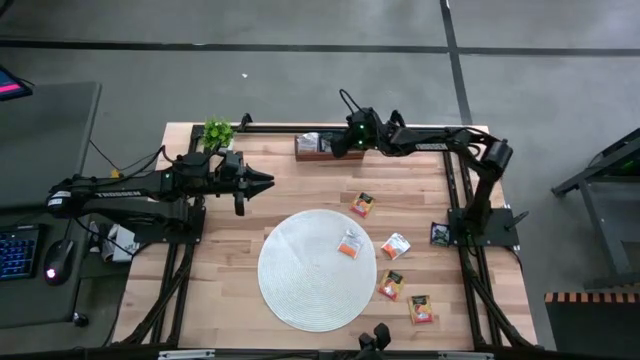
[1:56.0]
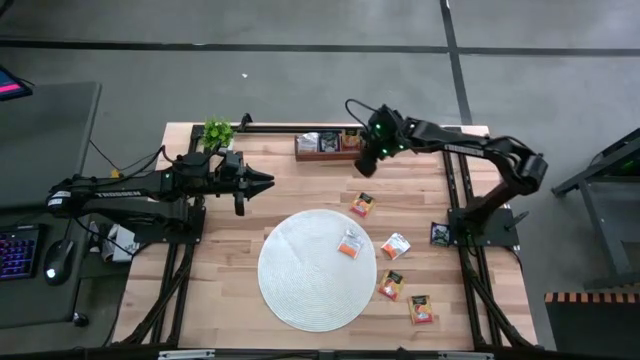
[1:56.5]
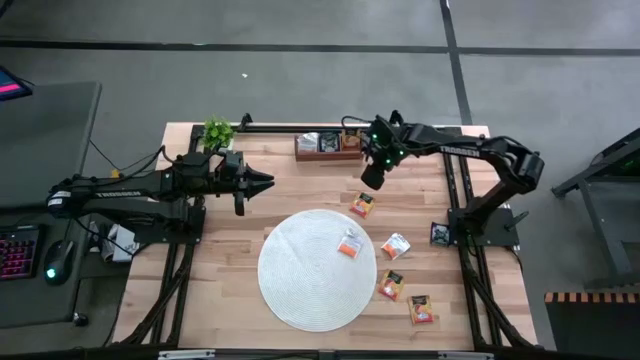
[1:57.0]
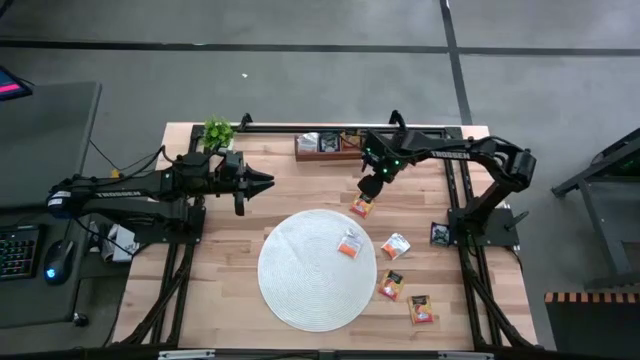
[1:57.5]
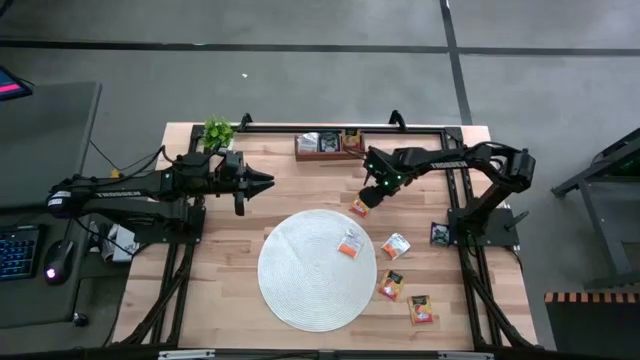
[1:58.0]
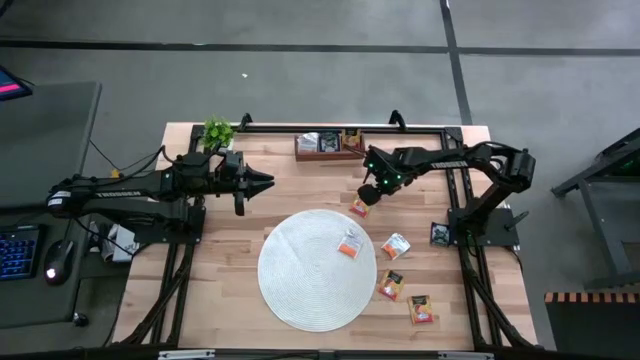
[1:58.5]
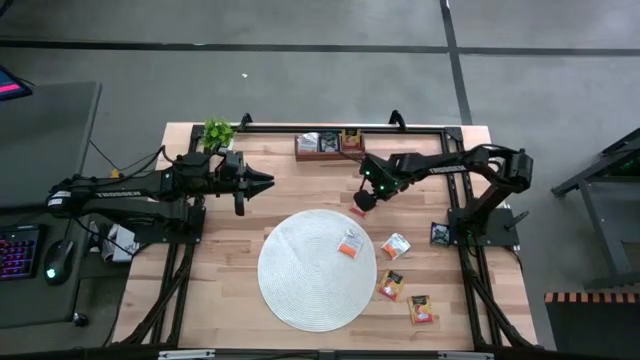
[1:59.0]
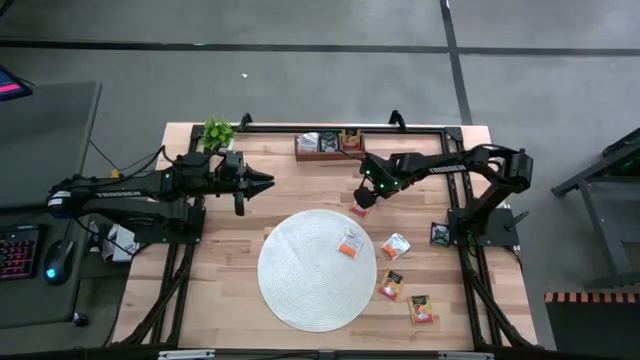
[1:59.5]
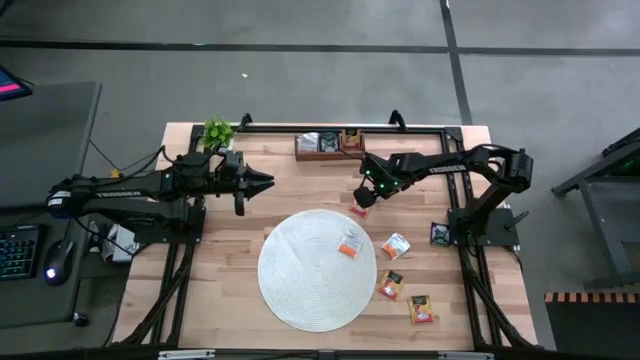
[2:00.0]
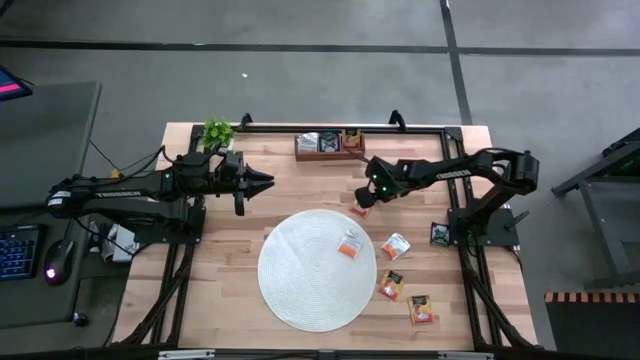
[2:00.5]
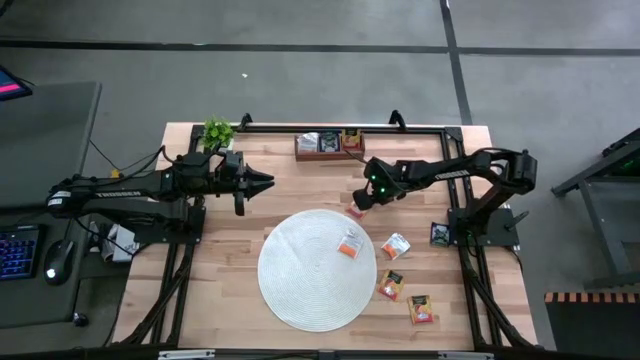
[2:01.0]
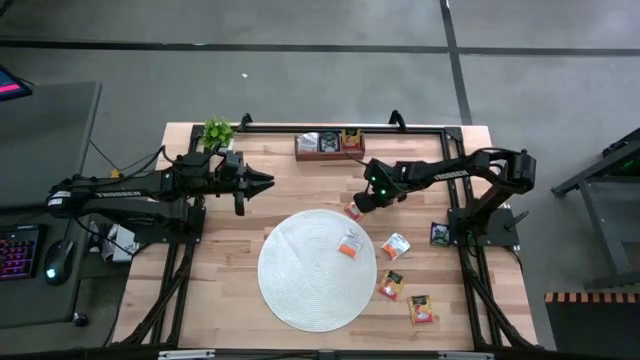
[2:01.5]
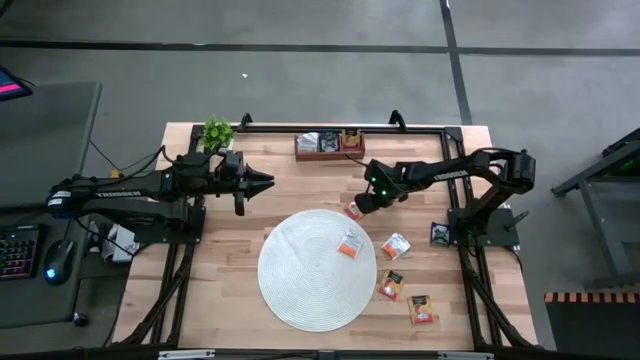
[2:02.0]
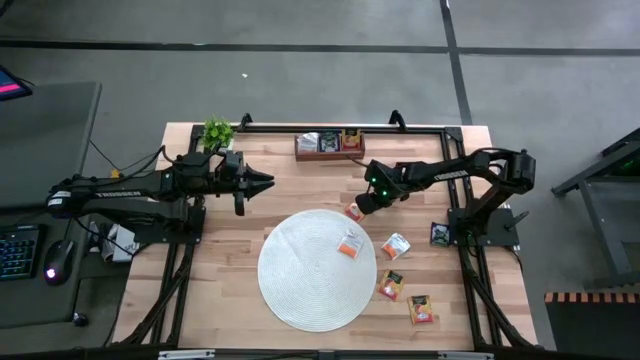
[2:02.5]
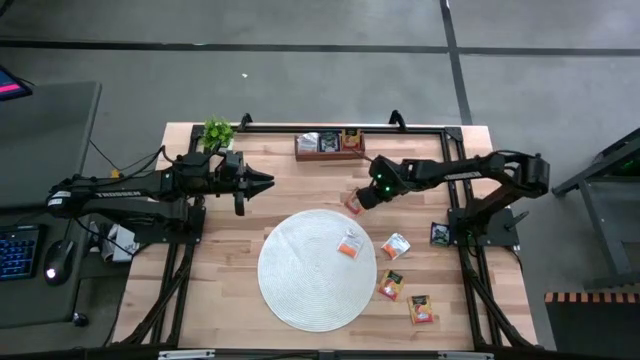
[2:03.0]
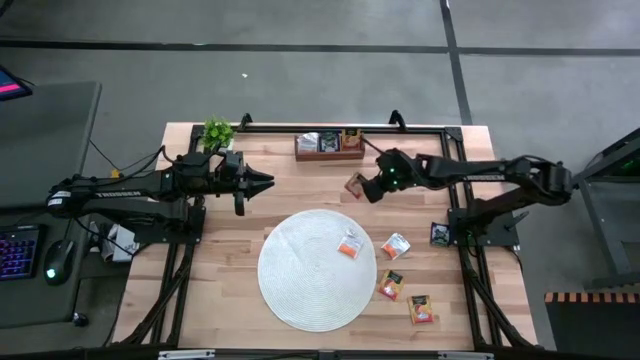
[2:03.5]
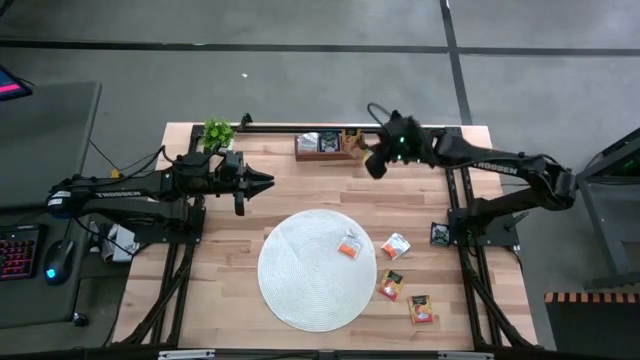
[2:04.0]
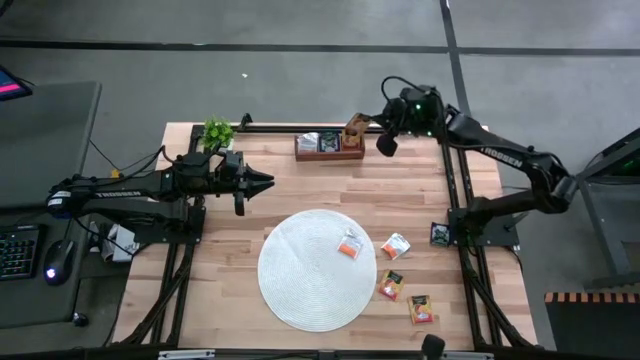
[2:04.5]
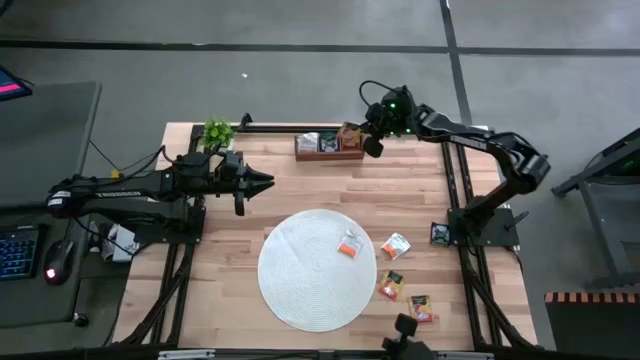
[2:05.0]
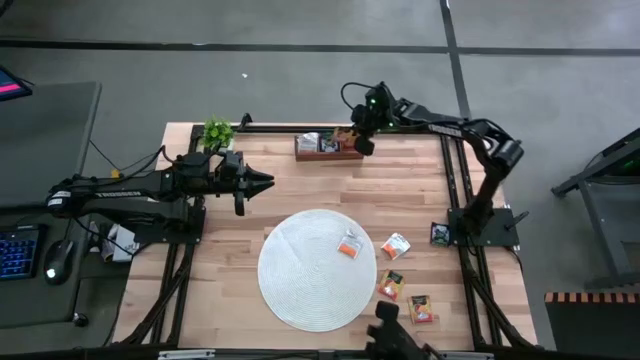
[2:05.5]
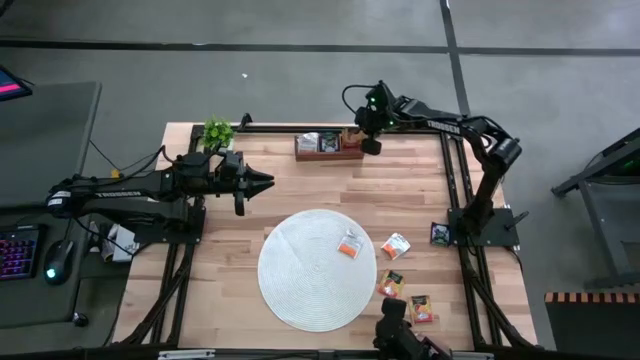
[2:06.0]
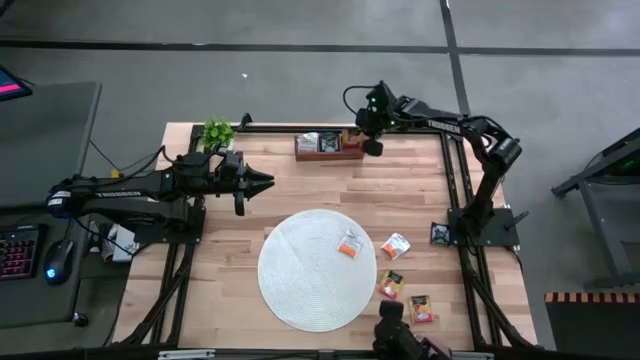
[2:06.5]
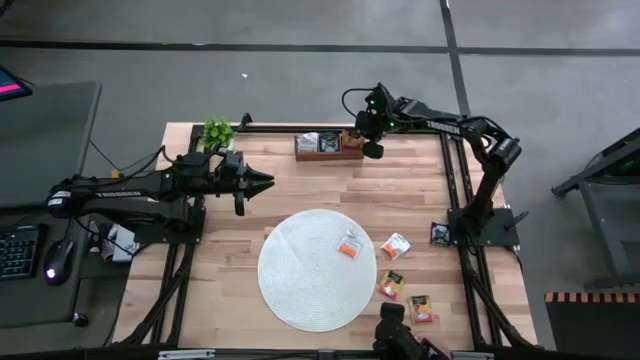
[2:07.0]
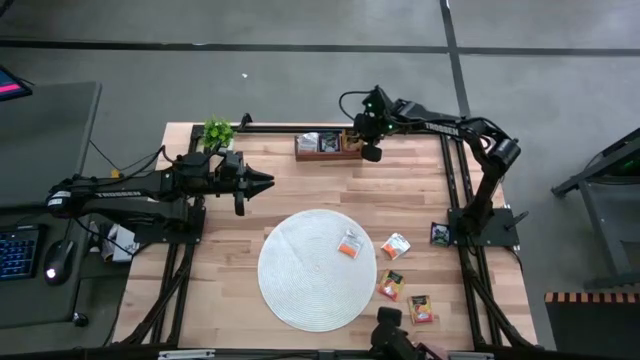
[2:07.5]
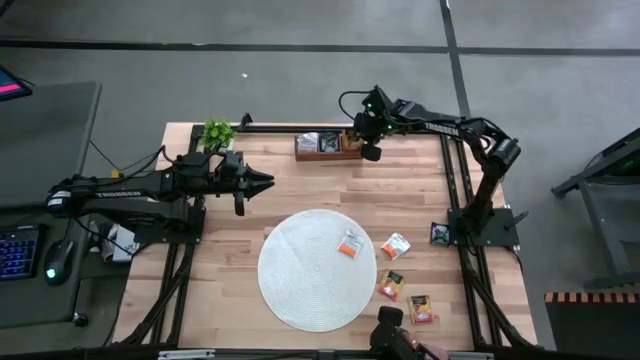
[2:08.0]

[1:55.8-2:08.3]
Task: Pick & Place Tea
Put the yellow tea bag into the right section of the wooden organizer

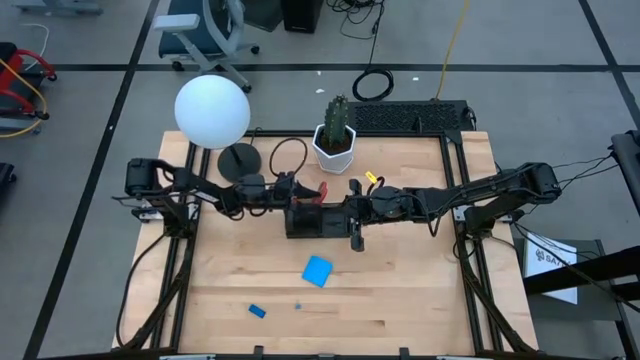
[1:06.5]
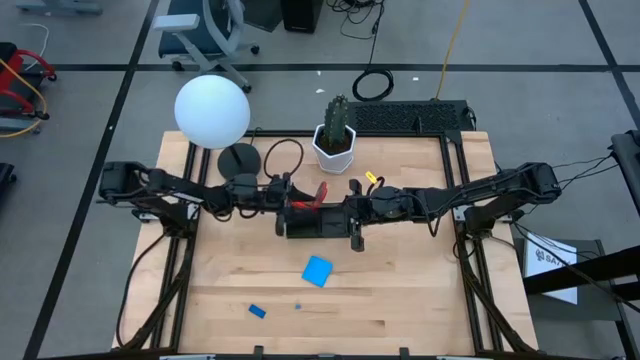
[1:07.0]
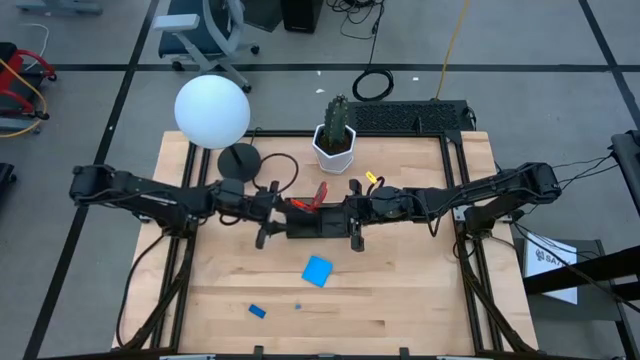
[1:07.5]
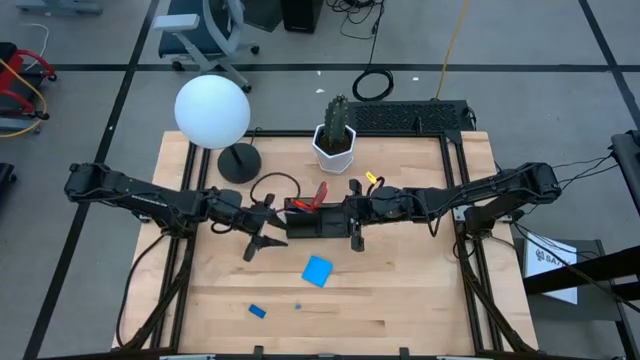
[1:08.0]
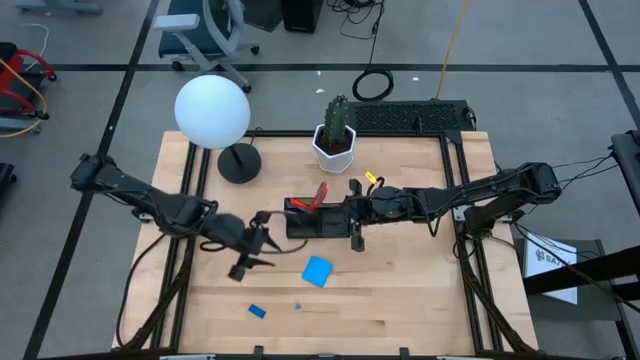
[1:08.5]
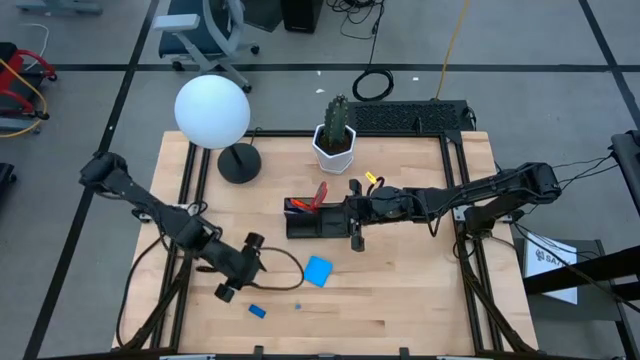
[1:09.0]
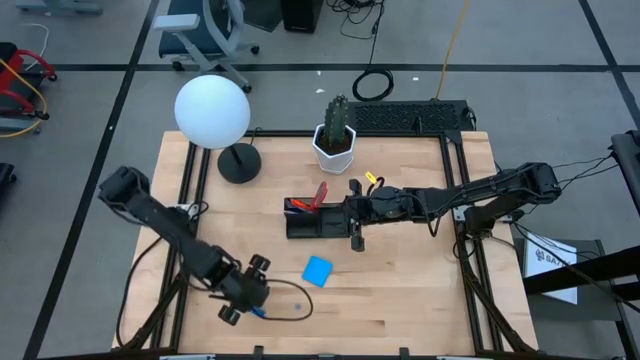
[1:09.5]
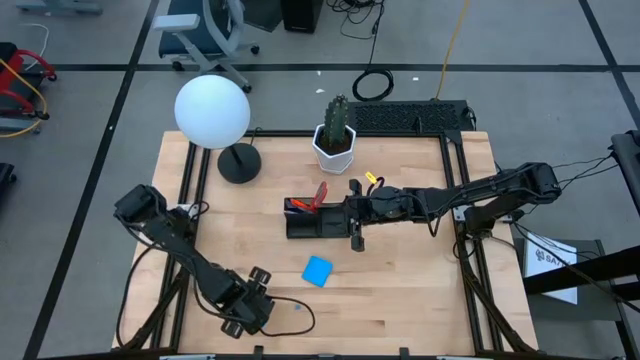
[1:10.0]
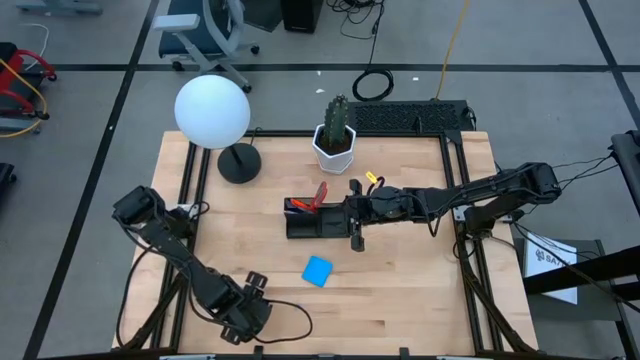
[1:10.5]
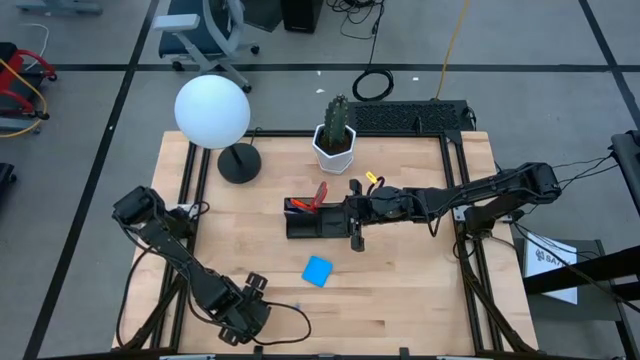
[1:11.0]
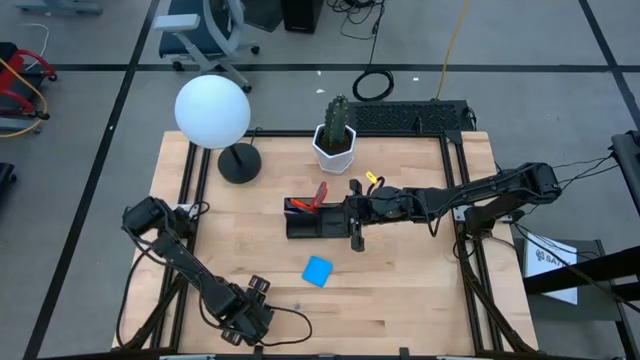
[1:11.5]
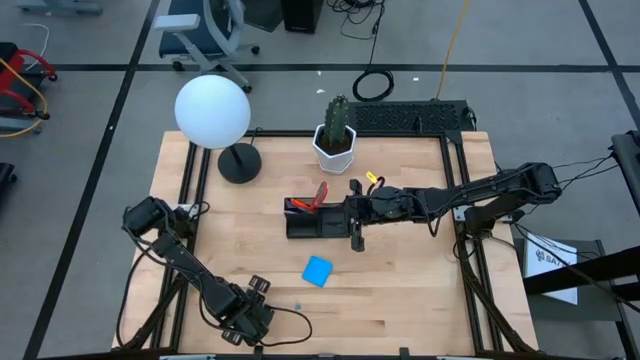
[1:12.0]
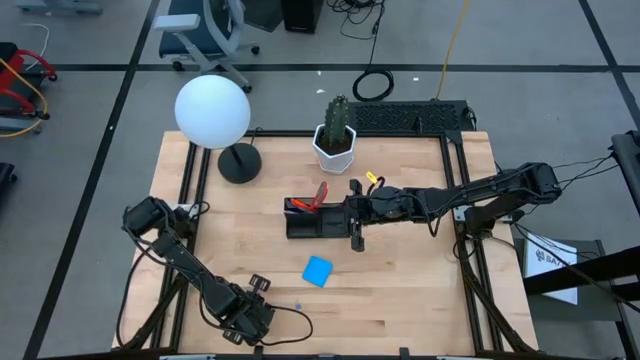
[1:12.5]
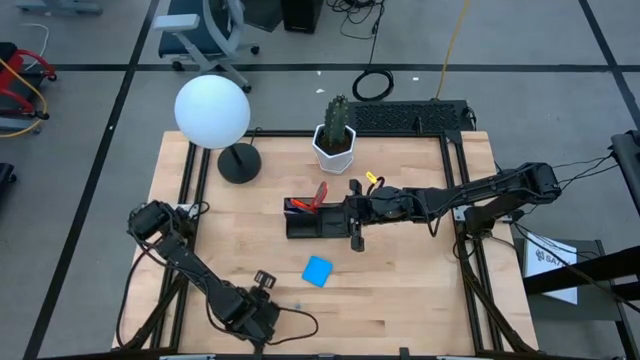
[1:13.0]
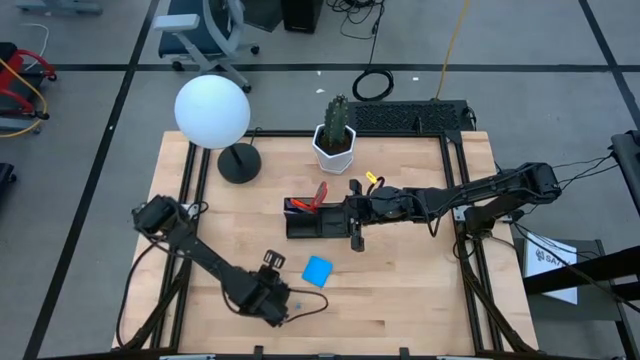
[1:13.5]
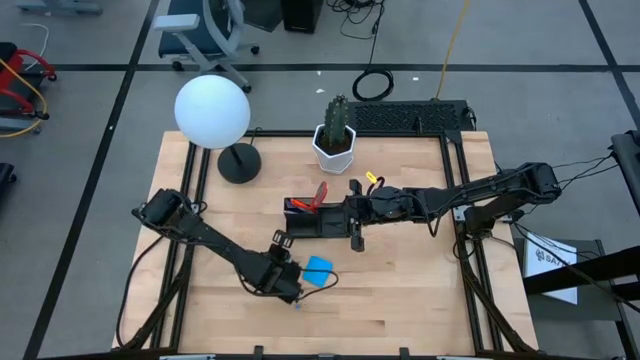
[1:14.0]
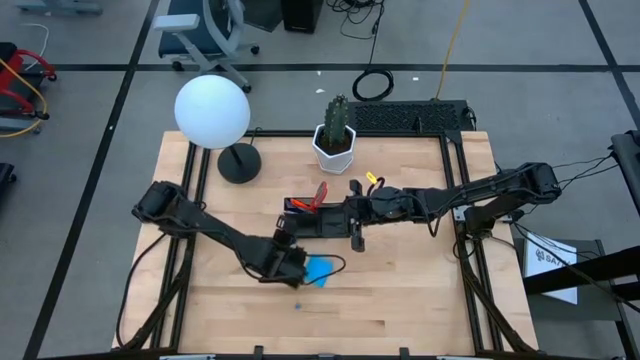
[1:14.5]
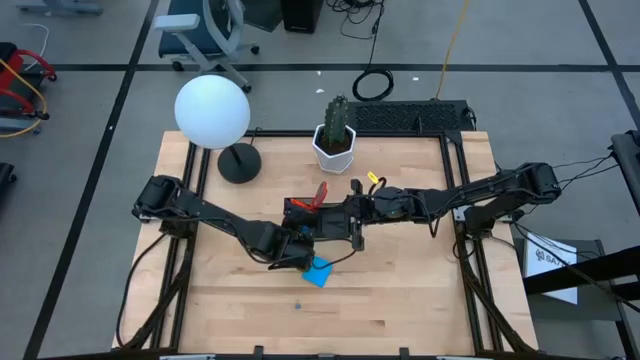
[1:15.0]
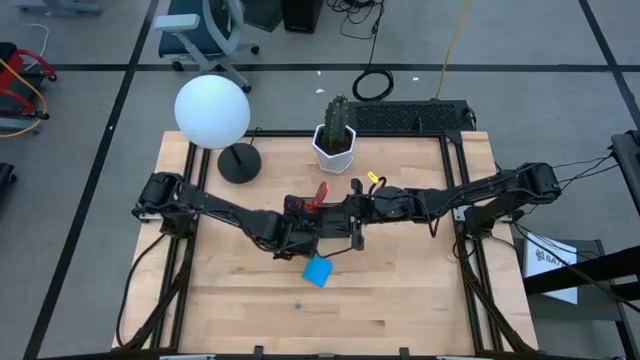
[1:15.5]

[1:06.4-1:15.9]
Task: Pick and place office supplies into organizer
Put the blue eraser into the black desk organizer
